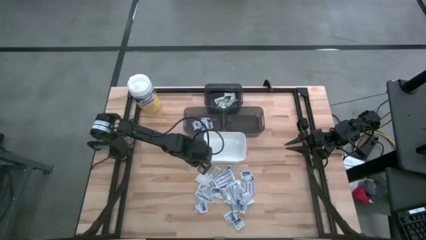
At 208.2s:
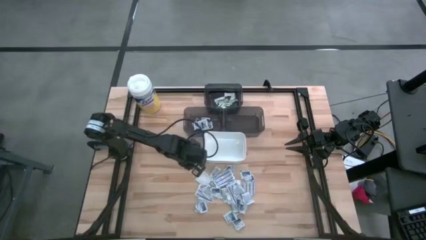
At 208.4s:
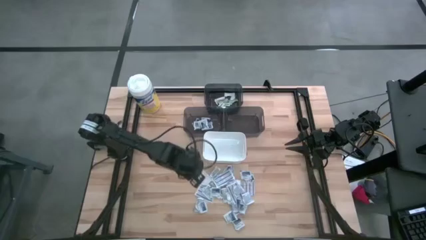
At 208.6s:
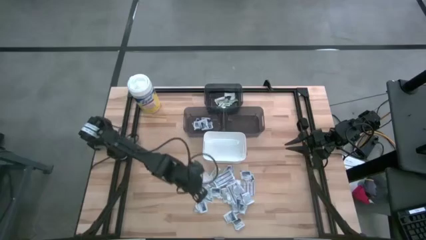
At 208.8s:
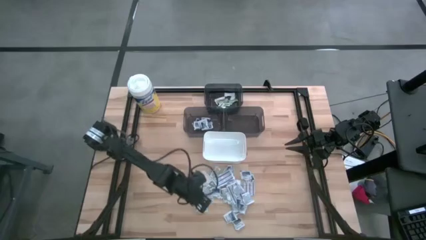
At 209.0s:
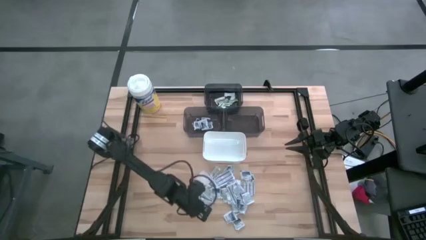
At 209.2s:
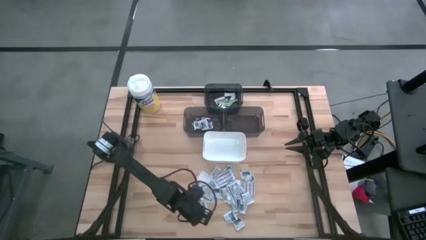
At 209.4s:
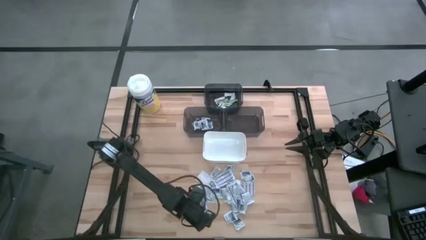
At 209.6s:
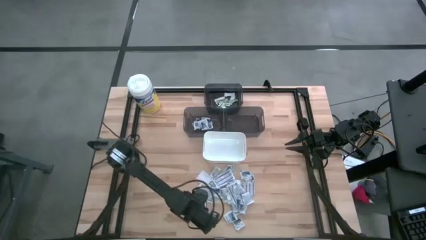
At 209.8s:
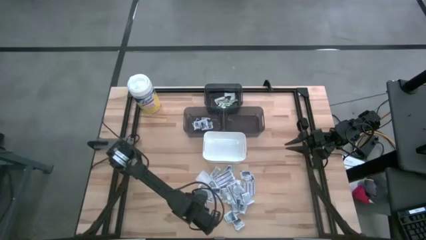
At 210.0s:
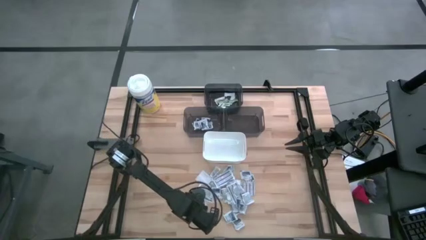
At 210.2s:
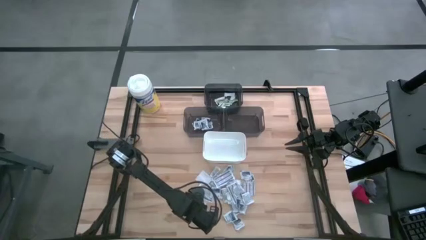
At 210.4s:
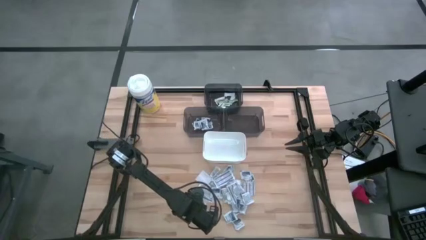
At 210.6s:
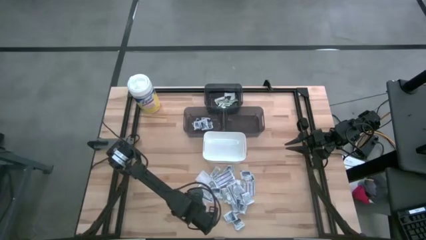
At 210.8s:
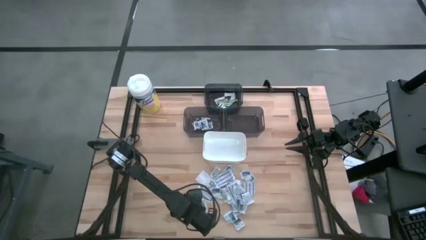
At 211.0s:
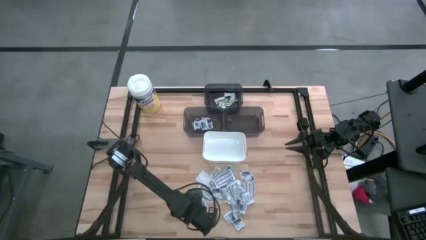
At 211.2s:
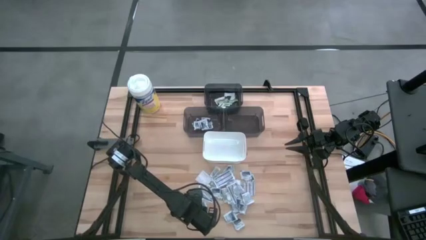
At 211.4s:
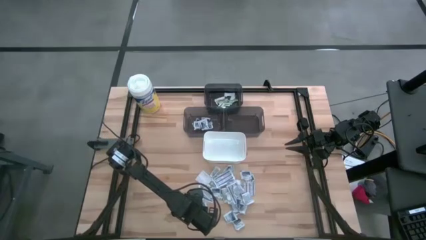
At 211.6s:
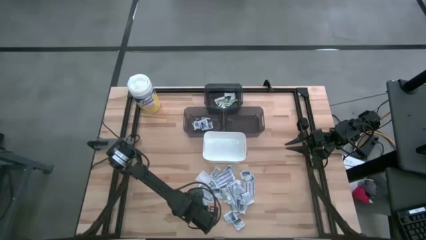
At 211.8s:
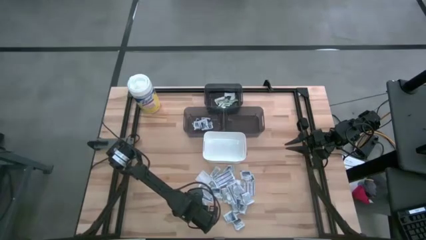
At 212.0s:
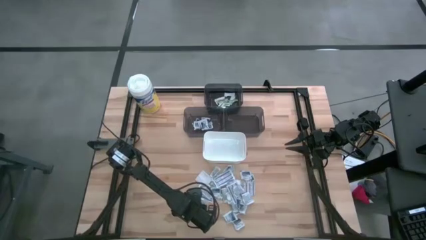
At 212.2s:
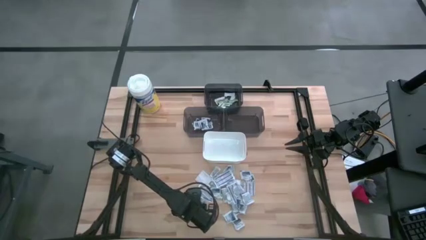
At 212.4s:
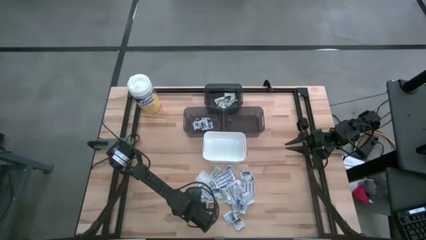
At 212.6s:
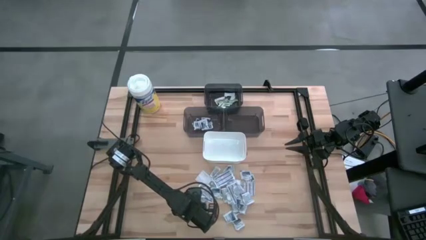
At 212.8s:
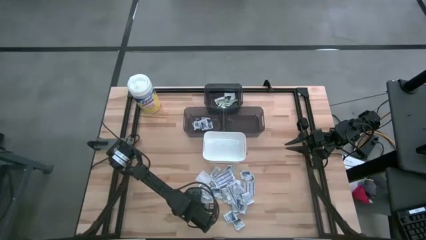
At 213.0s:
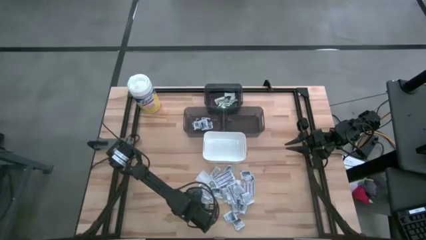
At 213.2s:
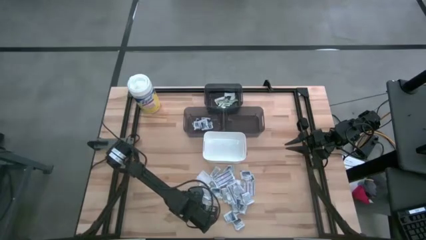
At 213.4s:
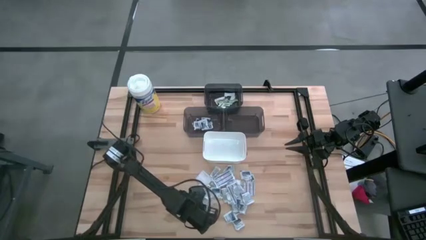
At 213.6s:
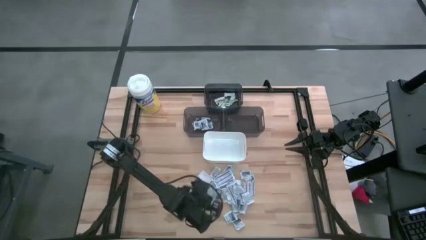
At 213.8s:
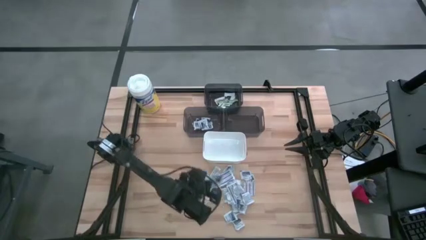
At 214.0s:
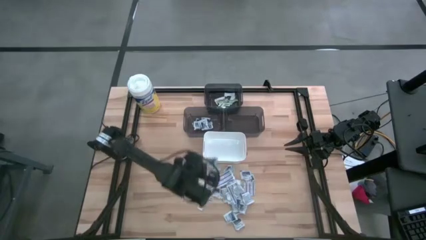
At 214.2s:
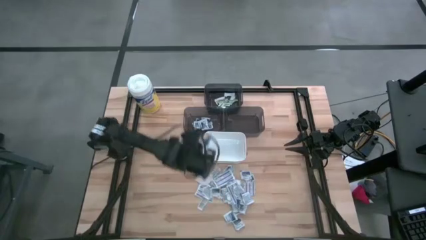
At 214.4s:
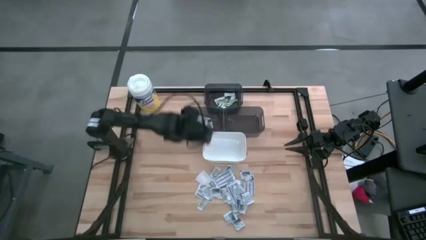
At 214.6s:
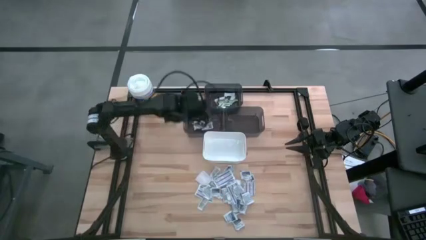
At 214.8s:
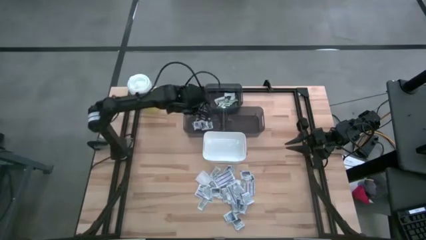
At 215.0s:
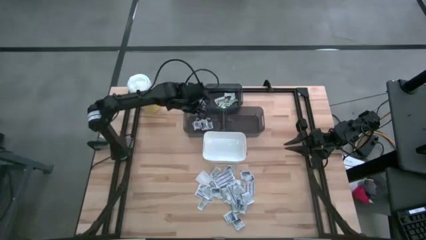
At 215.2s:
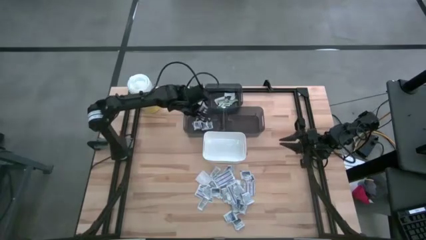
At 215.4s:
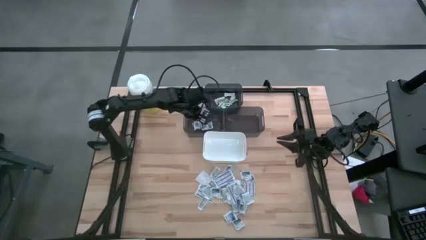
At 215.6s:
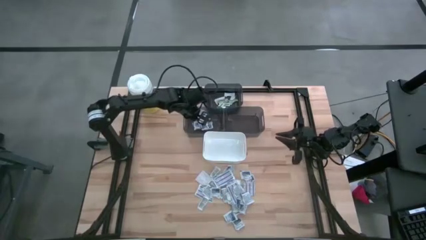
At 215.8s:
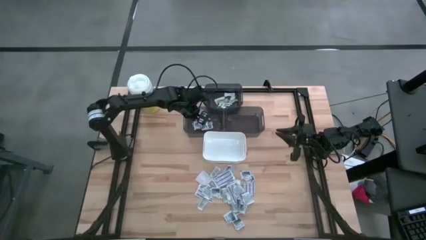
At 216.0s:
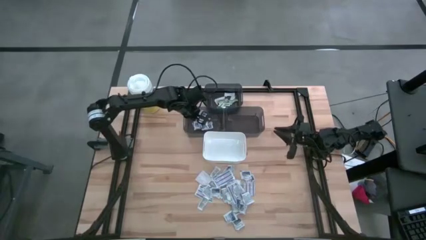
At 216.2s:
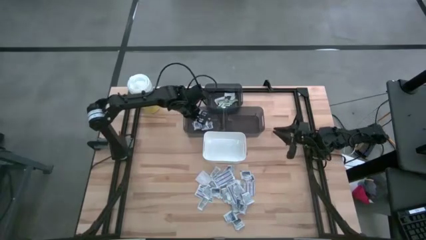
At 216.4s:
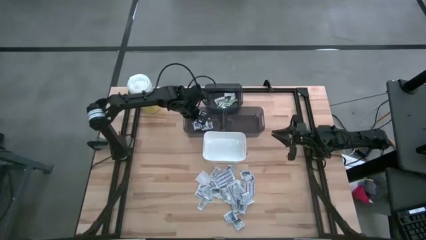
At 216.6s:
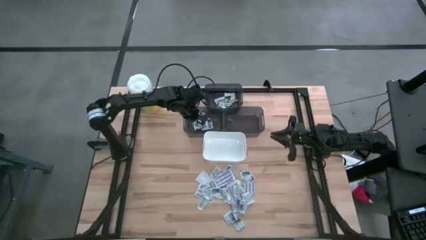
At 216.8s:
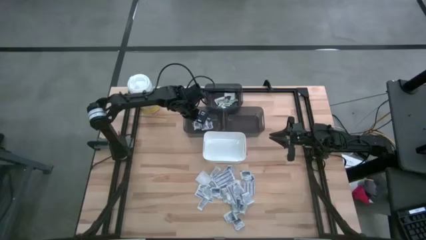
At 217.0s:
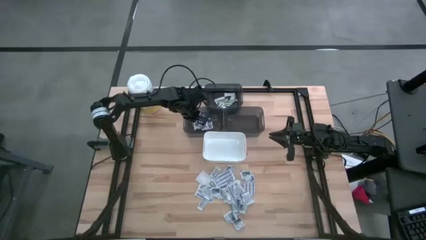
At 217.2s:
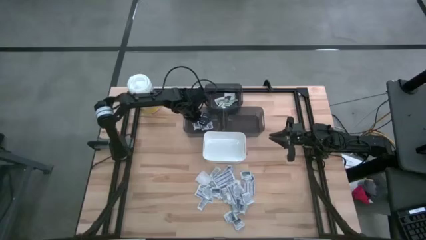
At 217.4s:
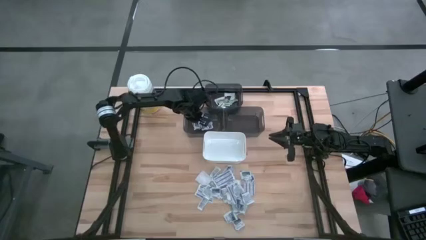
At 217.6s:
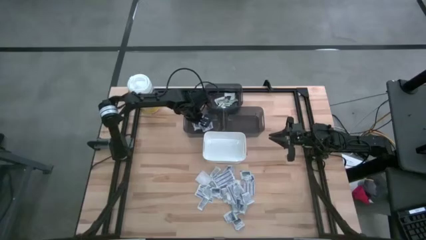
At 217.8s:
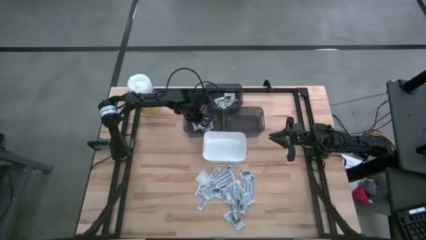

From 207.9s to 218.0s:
Task: Pick & Place First Aid Supplies
Put the alcohol pad into the left black bin

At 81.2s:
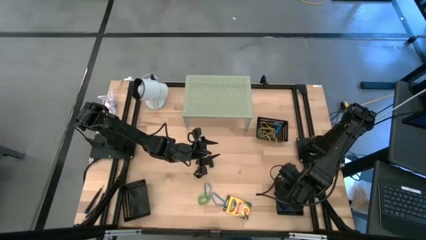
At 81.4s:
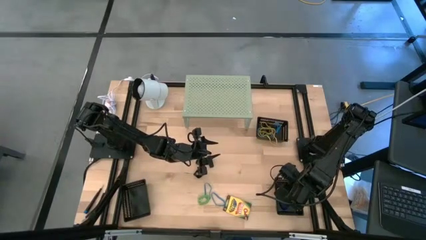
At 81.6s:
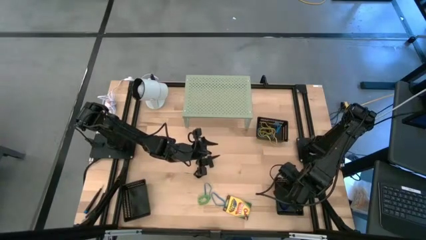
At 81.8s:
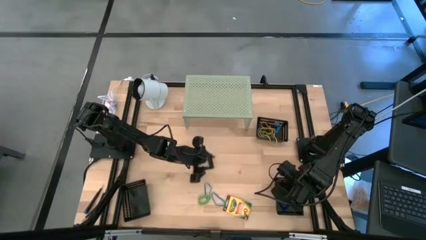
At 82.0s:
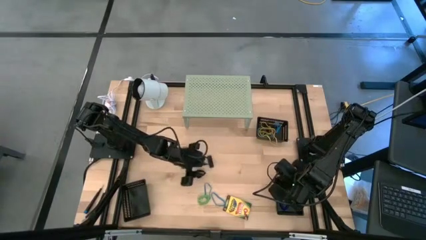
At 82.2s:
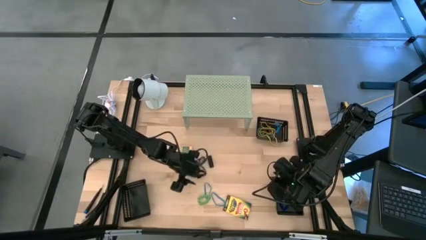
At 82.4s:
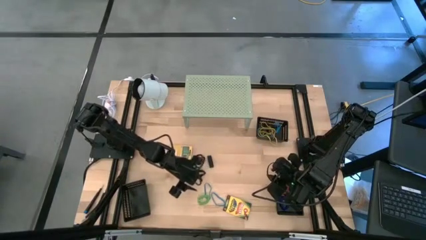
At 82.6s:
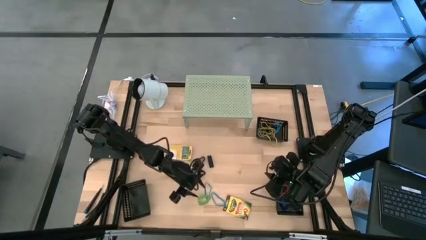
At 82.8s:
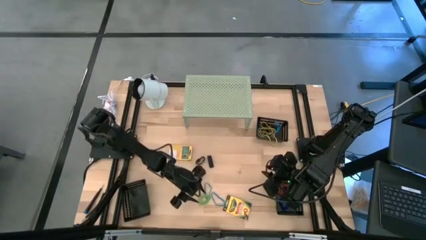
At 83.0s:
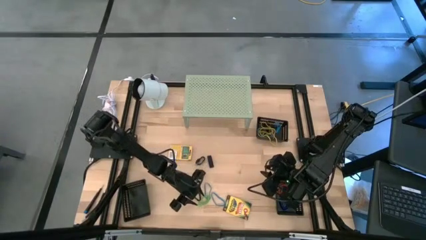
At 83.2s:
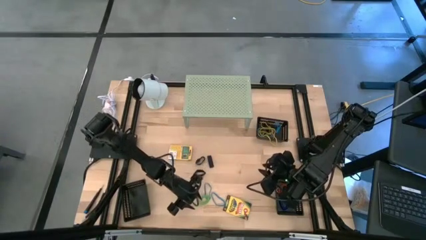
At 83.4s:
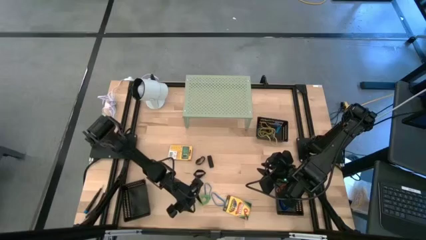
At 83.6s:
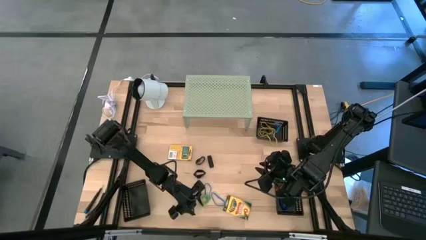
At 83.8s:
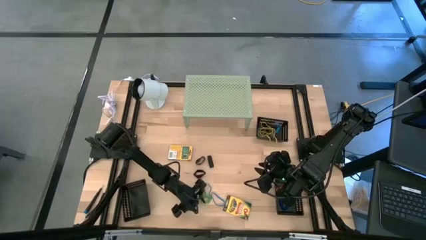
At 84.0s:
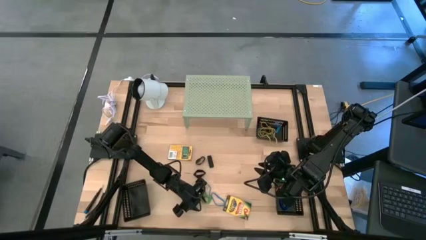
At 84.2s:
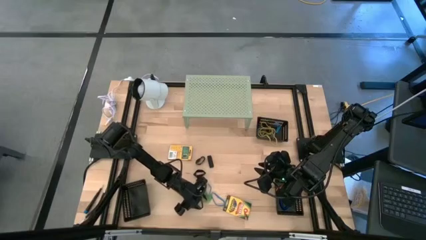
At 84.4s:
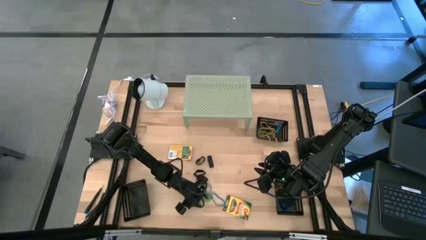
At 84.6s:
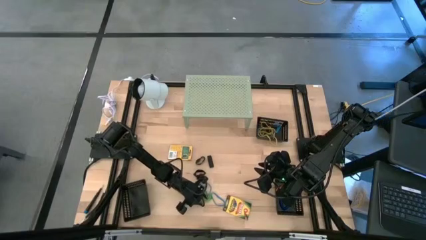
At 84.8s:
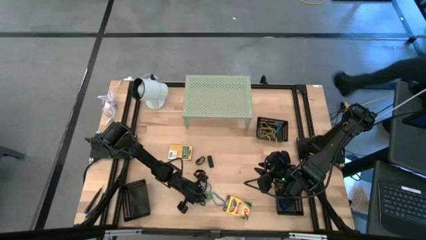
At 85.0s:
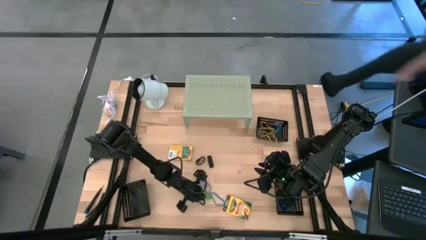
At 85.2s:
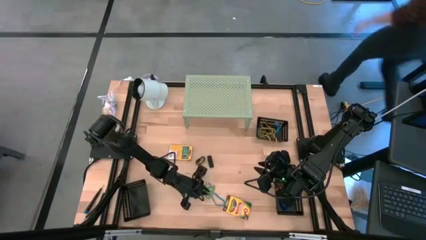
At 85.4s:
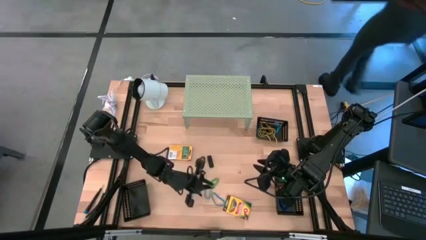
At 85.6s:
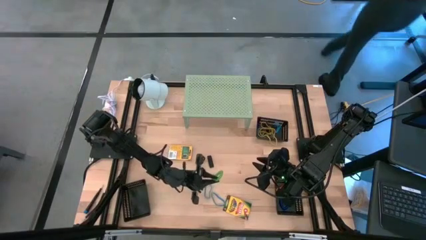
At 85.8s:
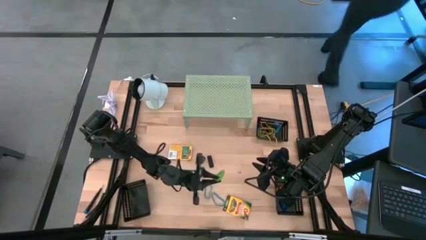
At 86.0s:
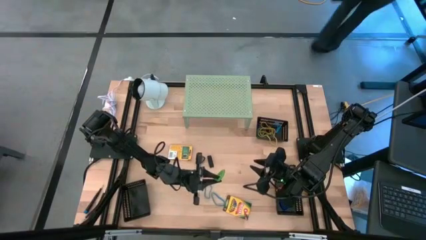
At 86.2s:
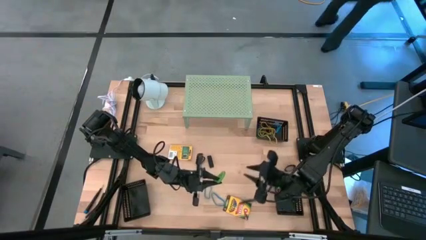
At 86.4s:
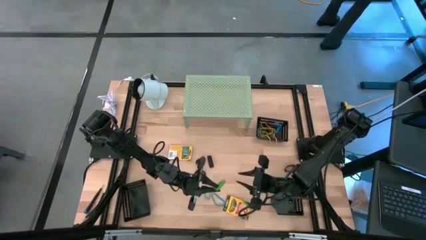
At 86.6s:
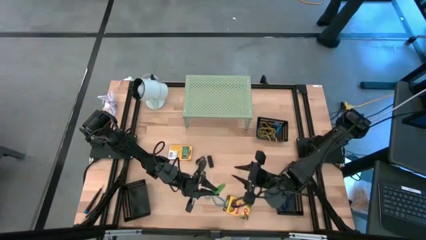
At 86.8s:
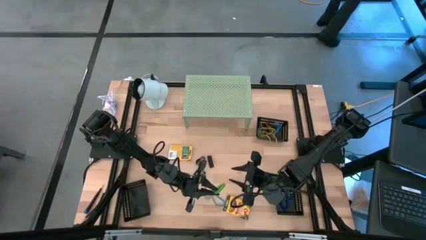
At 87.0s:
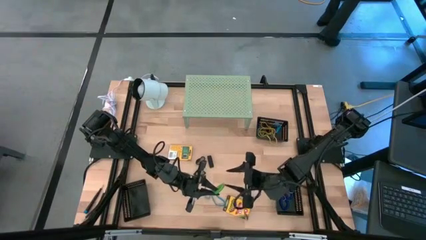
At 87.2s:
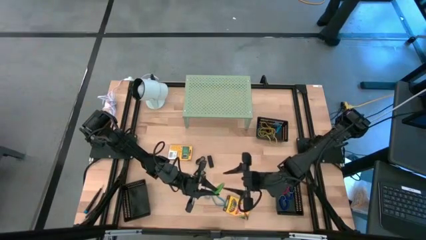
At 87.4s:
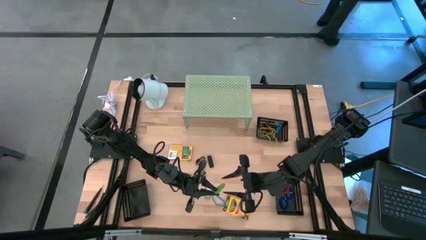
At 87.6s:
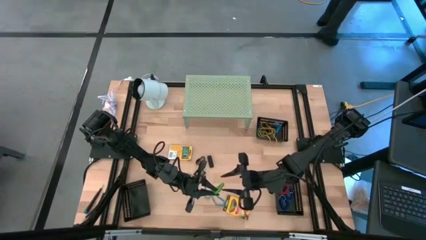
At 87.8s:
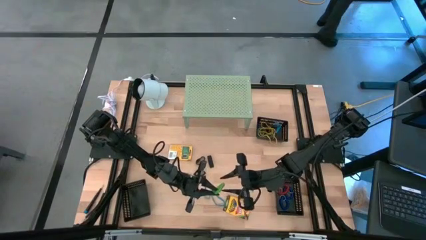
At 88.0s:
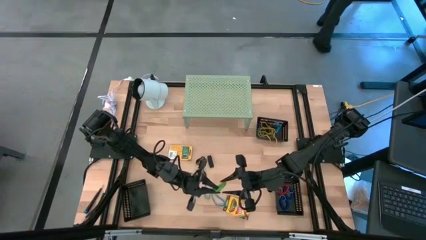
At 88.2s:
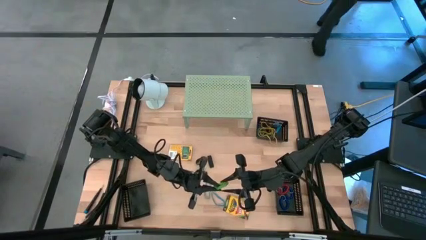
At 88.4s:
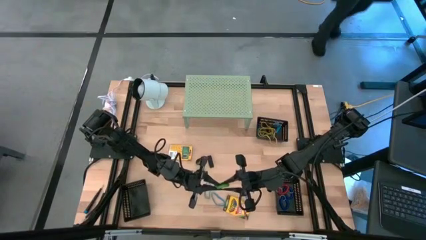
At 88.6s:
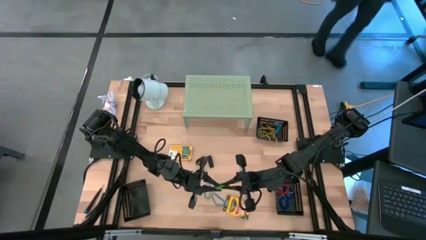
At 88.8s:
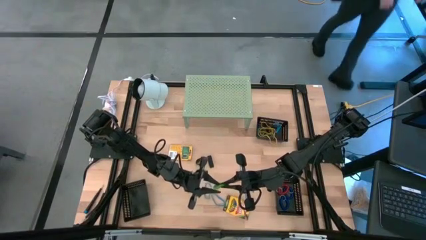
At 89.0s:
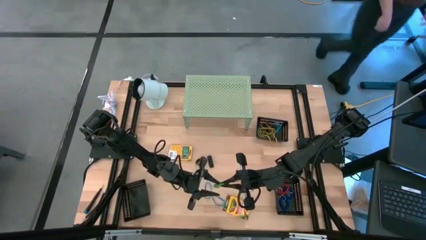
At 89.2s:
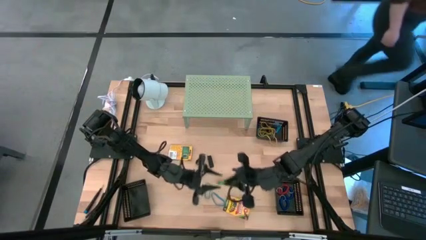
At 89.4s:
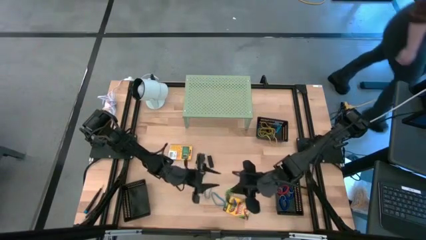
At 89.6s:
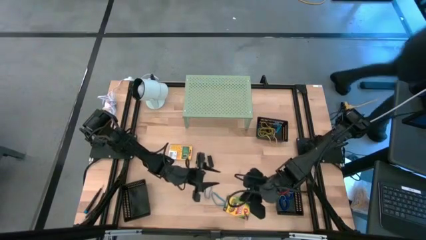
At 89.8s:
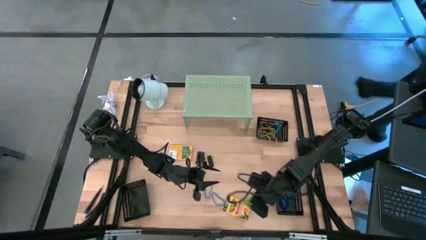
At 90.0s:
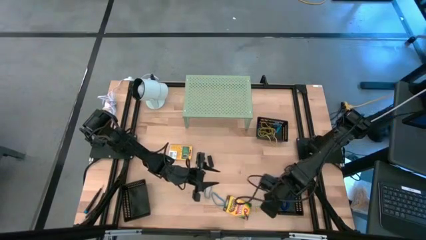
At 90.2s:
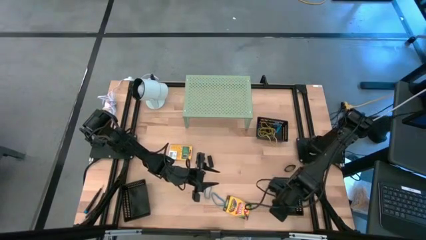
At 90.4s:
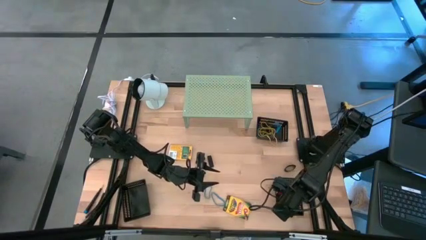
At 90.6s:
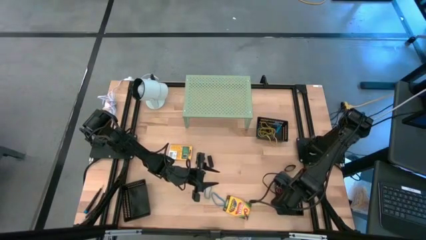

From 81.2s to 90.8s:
Task: Pick & Place Office Desk Supplies
Put the green spring keychain into the bottom right black bin
